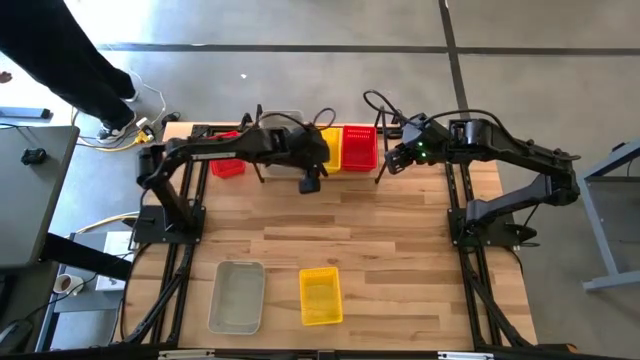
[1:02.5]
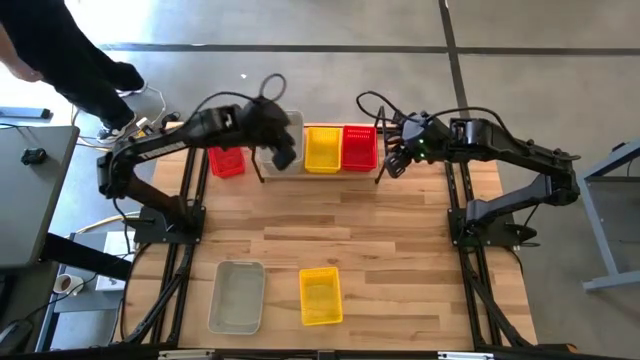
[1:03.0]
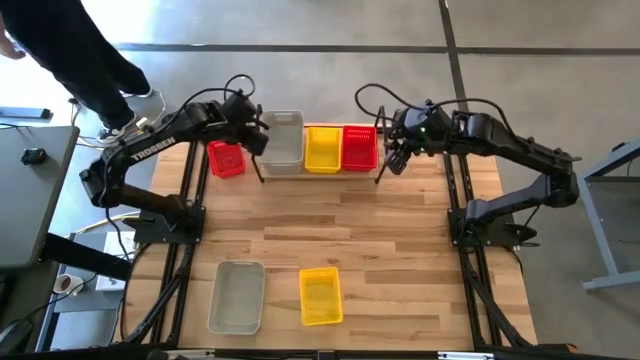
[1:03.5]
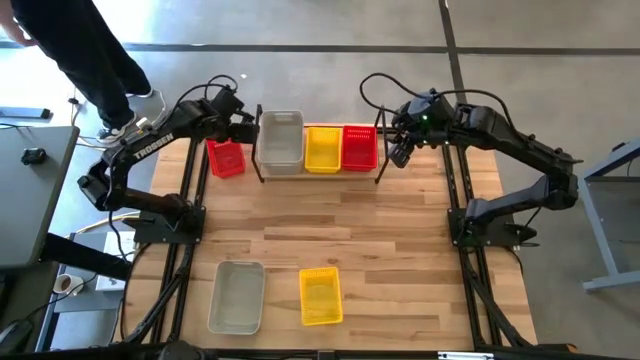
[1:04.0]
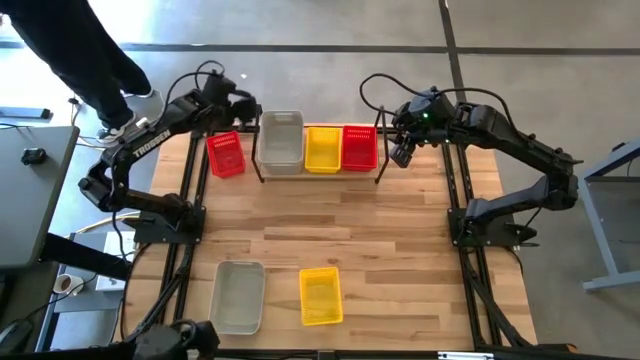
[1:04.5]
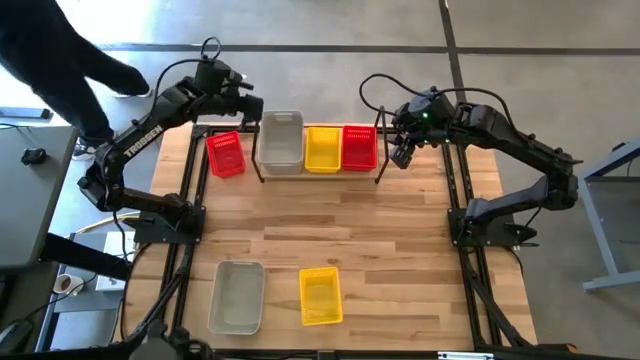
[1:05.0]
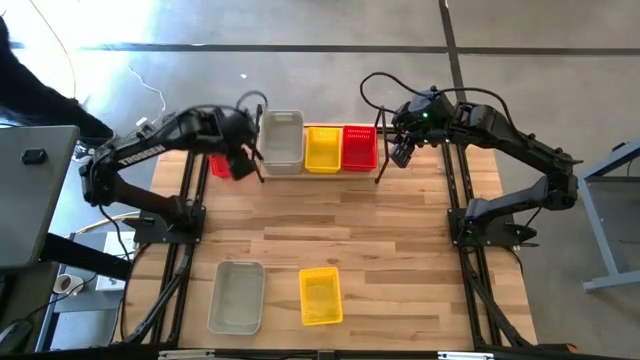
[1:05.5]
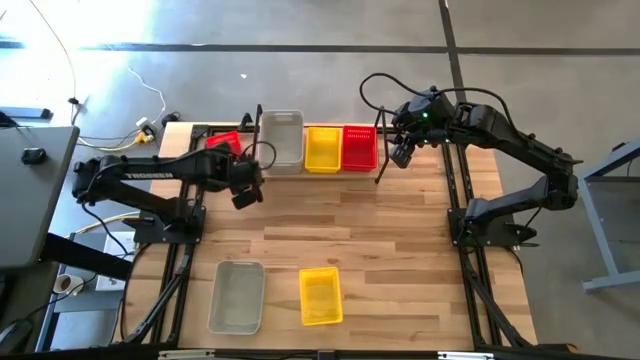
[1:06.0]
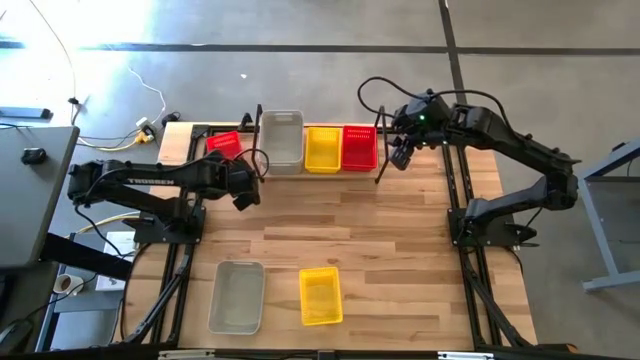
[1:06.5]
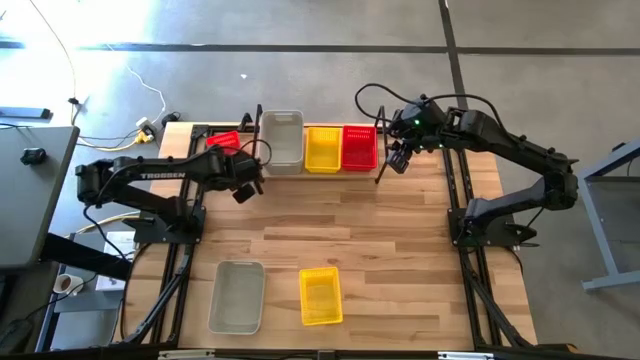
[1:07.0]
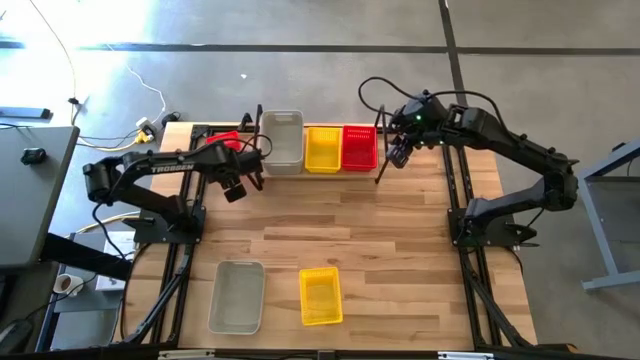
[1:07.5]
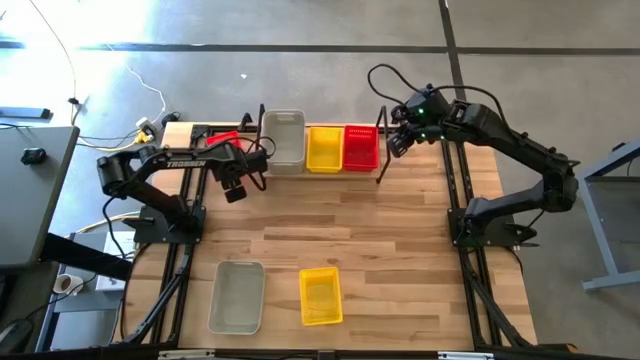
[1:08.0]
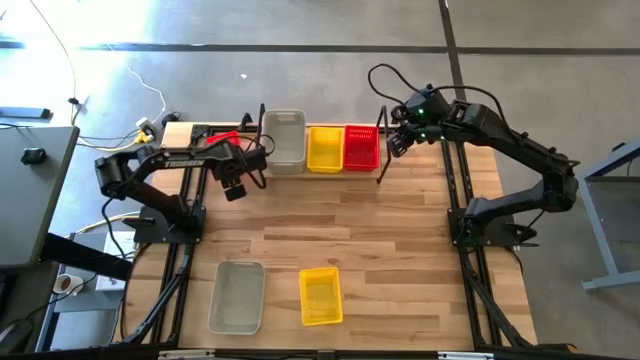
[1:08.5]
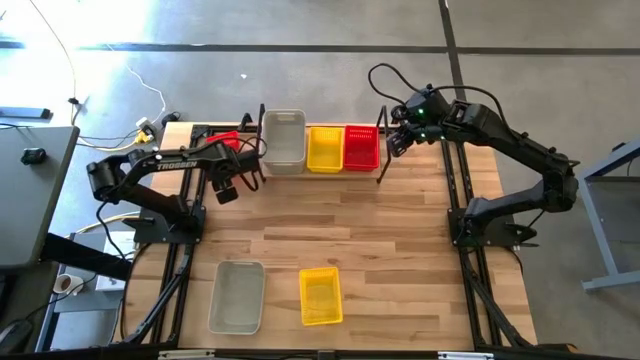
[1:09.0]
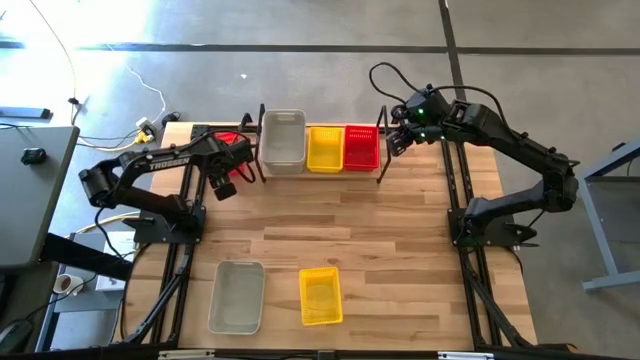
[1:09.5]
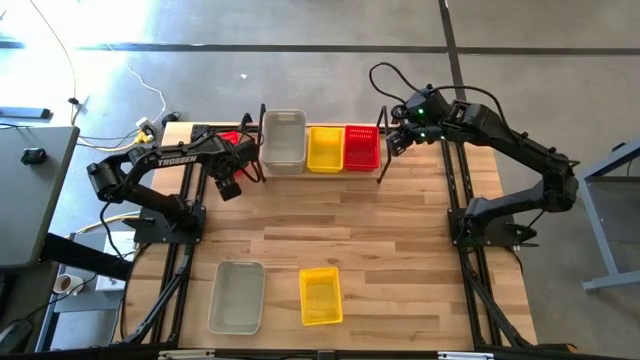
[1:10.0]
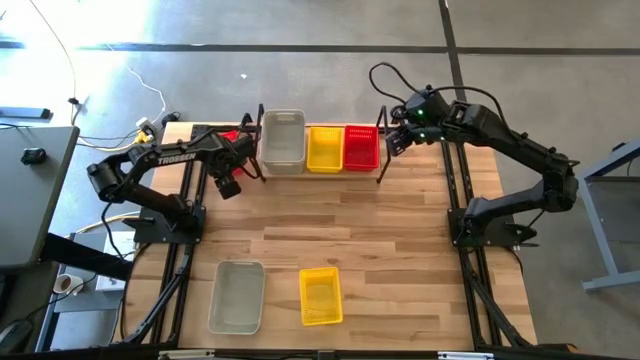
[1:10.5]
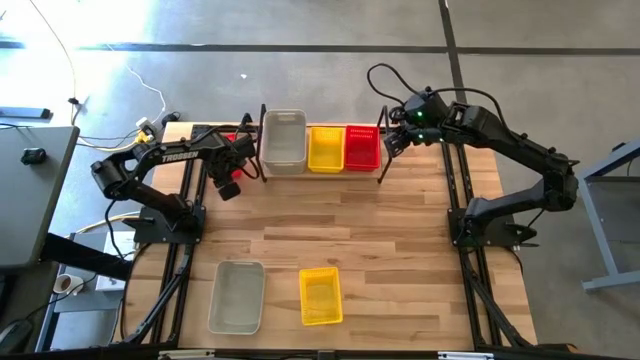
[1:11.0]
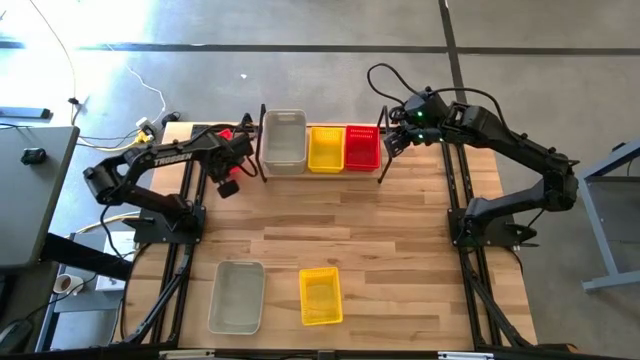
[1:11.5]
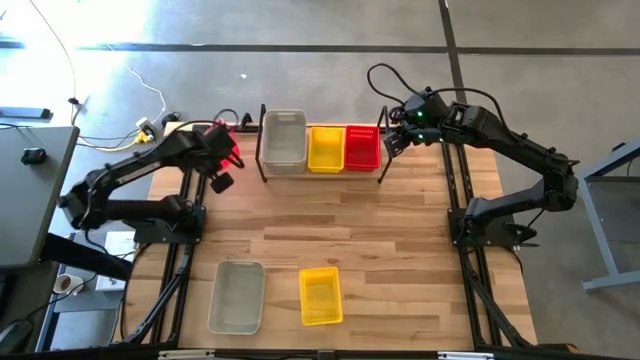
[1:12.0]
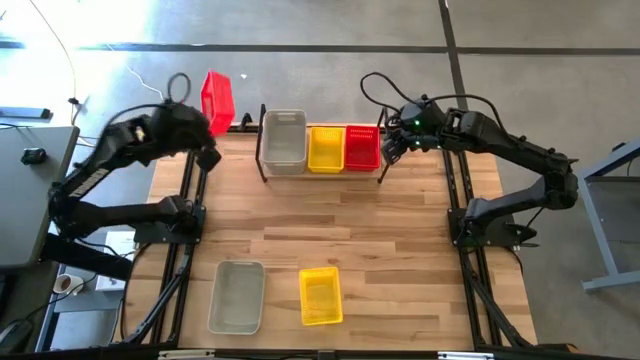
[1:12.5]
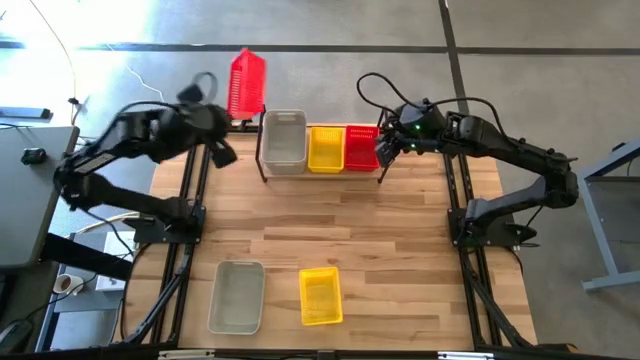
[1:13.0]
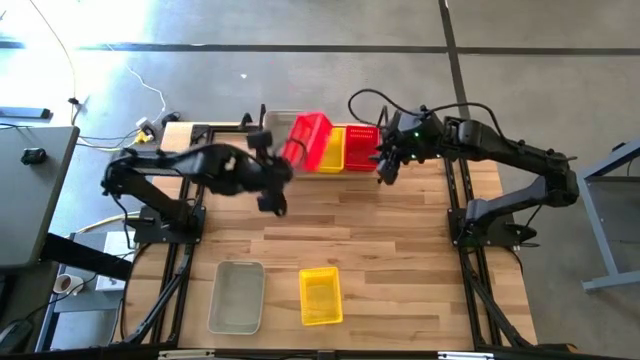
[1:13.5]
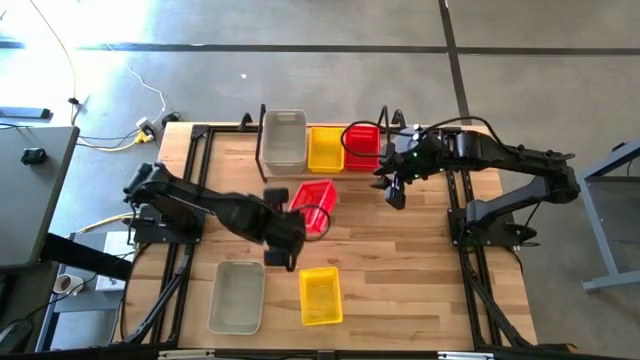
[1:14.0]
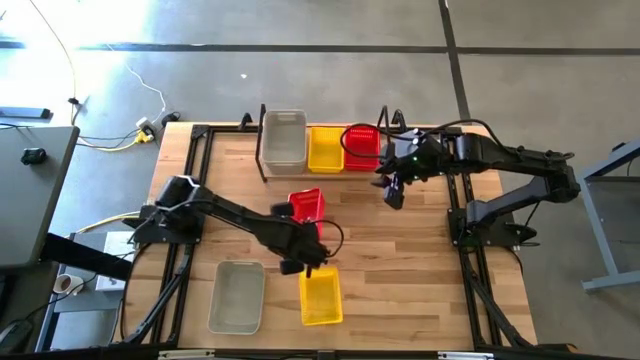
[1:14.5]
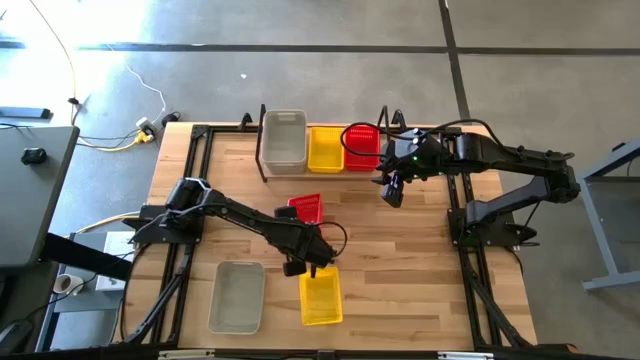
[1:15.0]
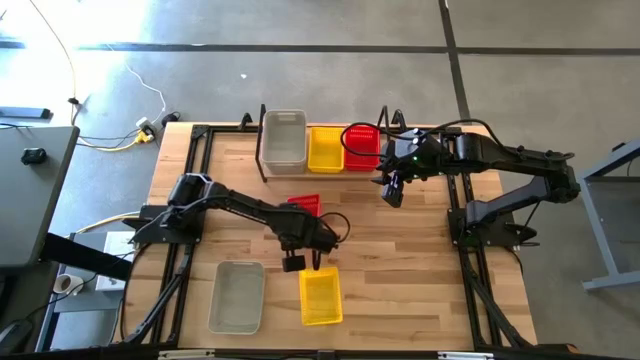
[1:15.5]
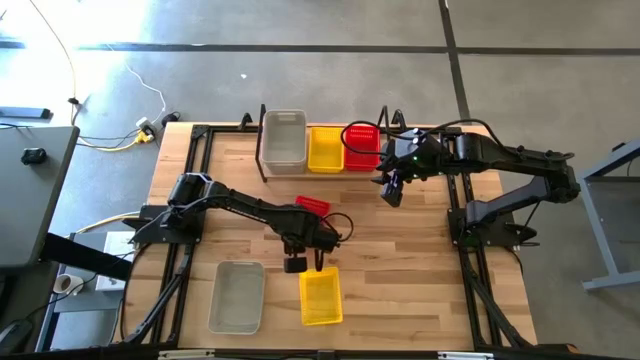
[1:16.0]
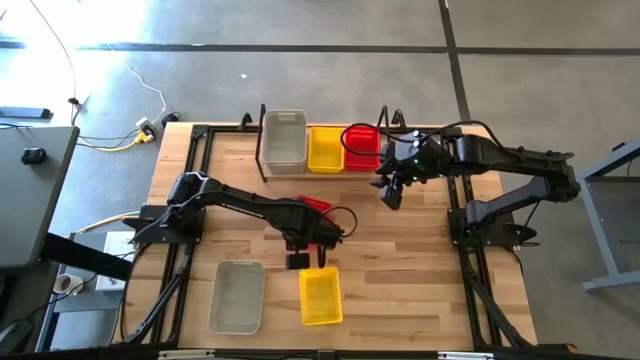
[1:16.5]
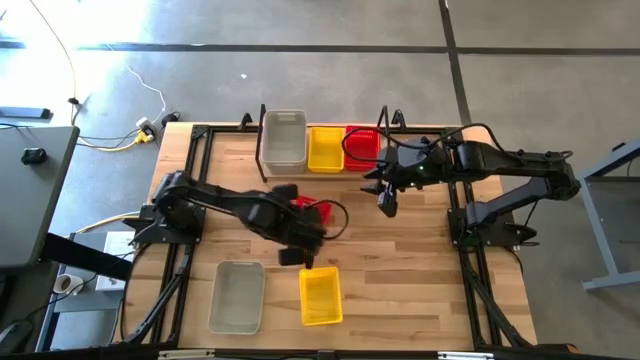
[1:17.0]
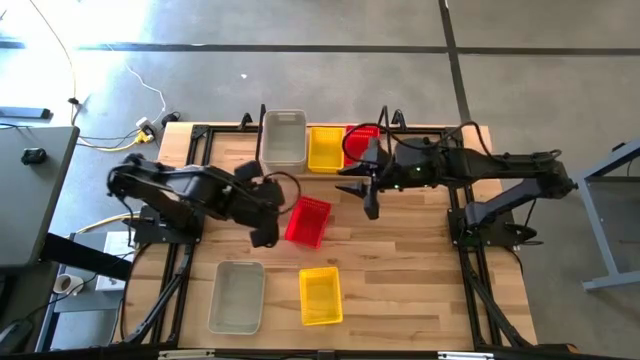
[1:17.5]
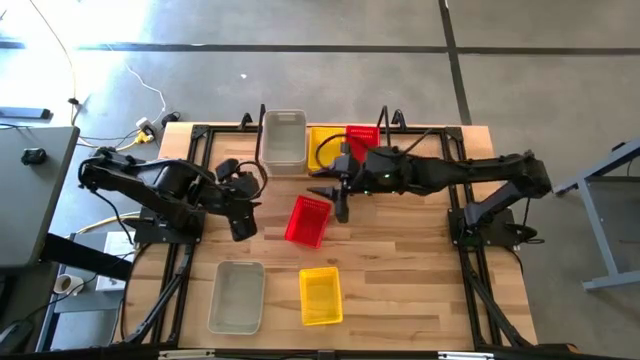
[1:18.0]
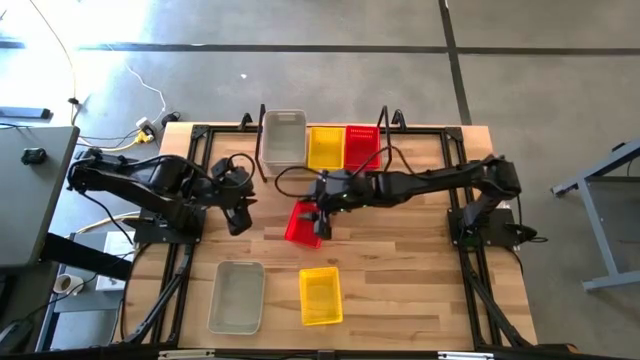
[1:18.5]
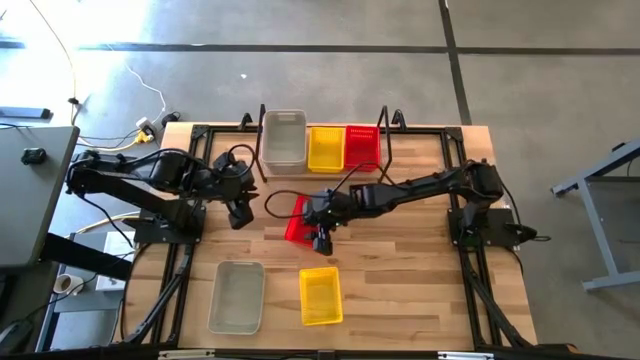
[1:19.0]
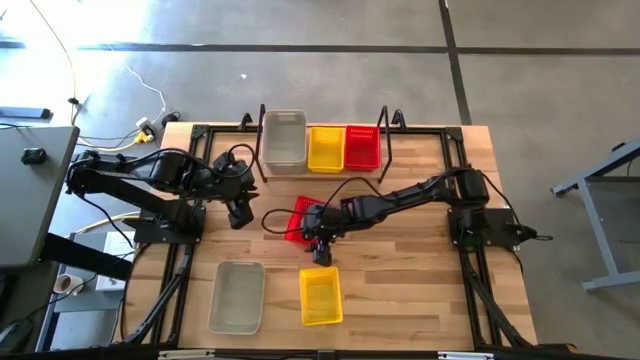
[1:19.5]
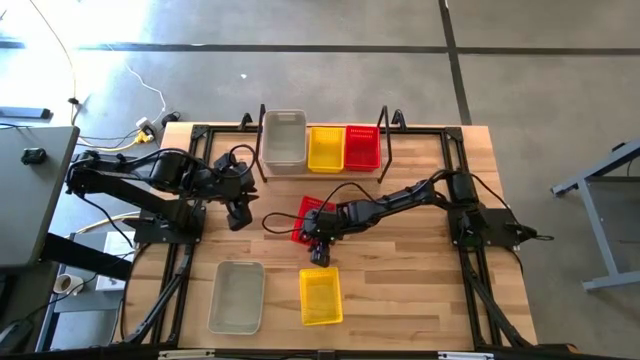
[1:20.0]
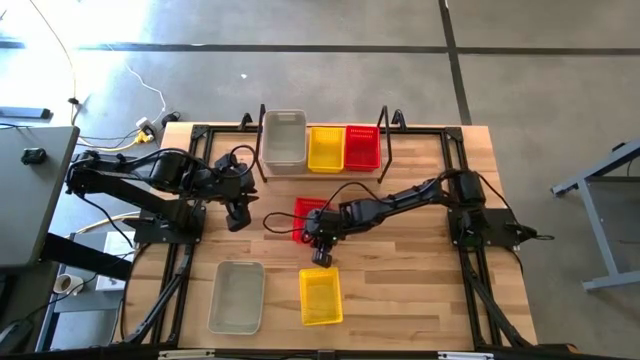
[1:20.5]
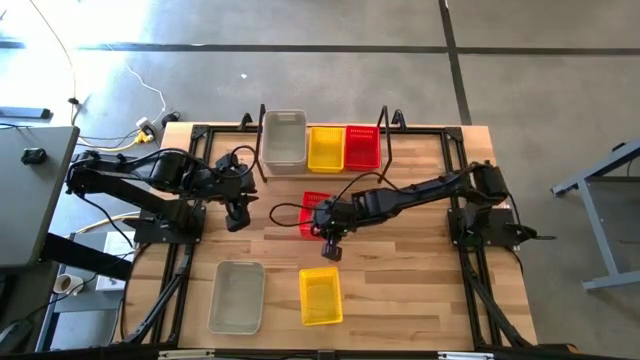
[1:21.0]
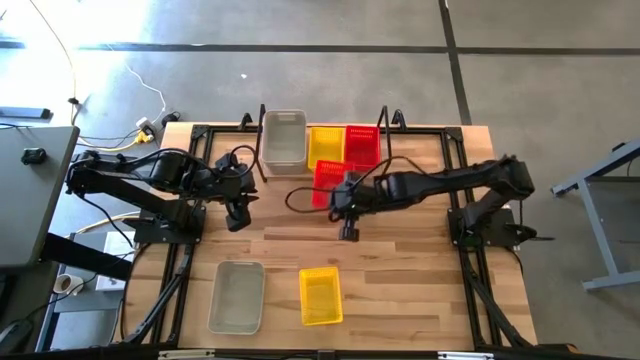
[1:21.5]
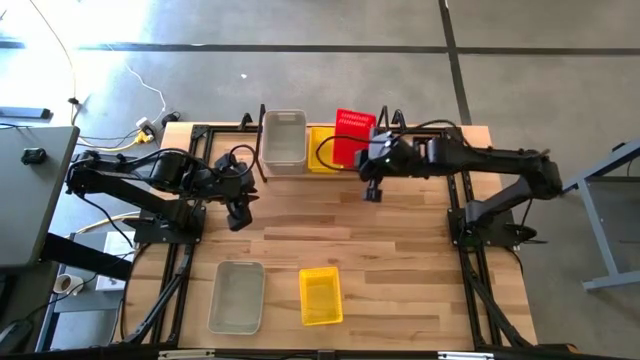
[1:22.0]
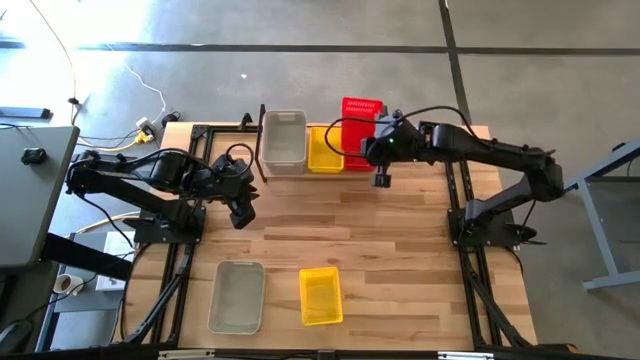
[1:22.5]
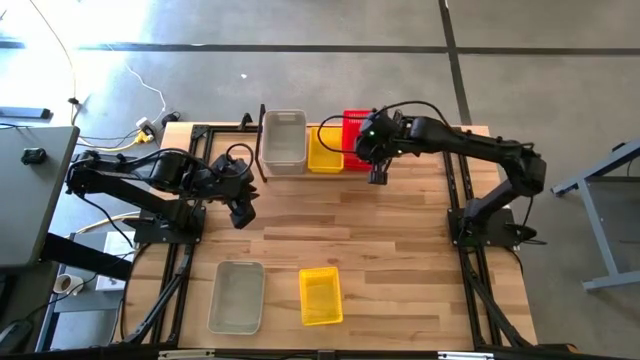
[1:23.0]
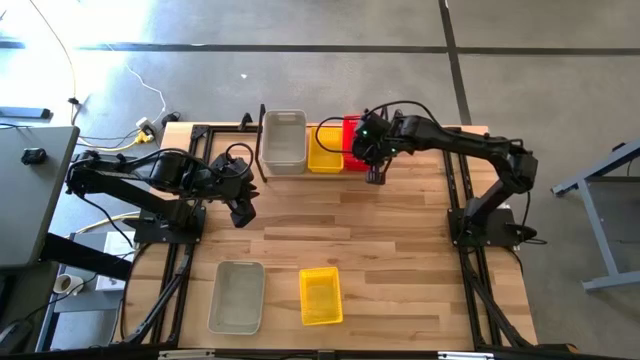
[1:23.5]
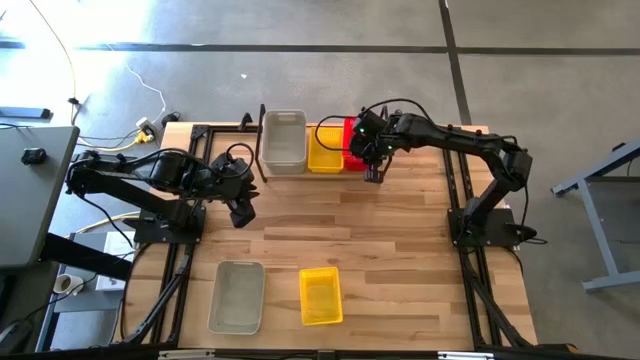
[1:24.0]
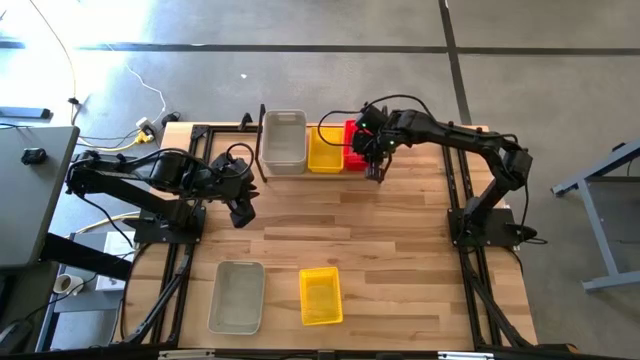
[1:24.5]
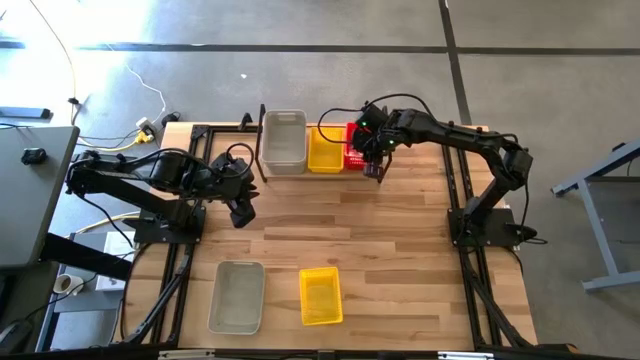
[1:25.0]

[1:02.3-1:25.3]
Task: Stack baskets on shelf by color
Stack the red bin on the red bins on the shelf
